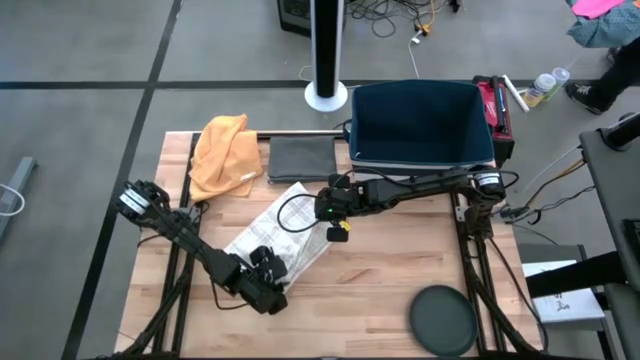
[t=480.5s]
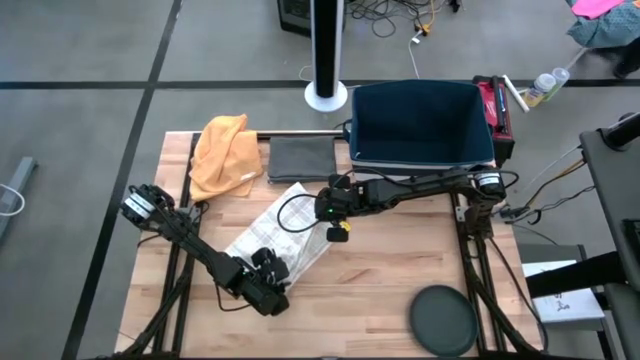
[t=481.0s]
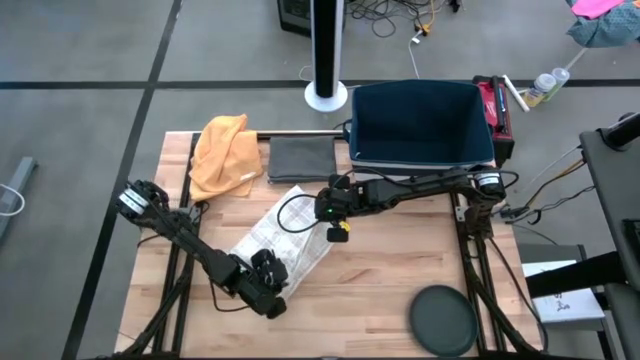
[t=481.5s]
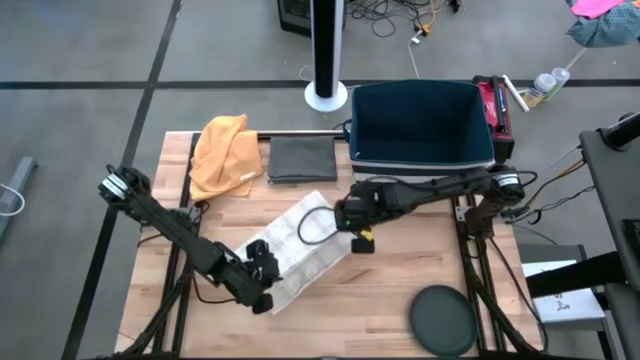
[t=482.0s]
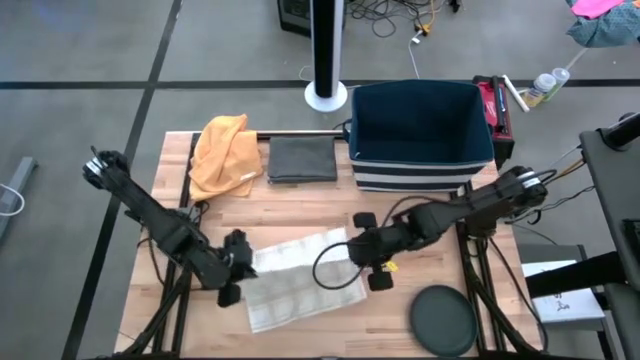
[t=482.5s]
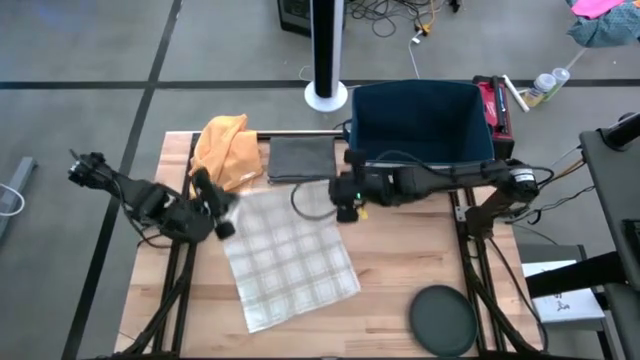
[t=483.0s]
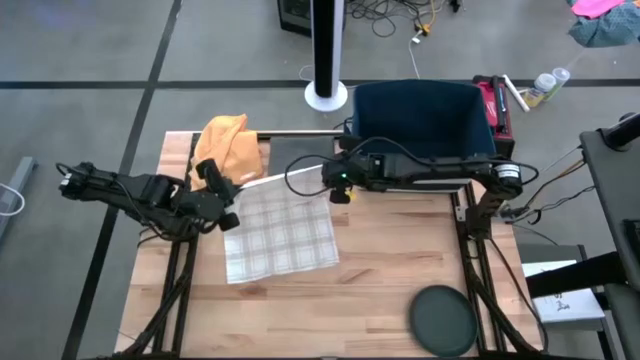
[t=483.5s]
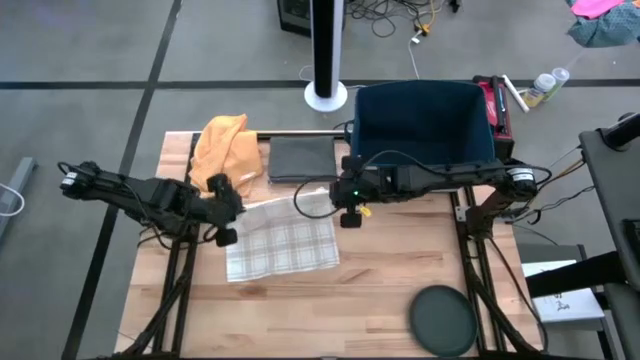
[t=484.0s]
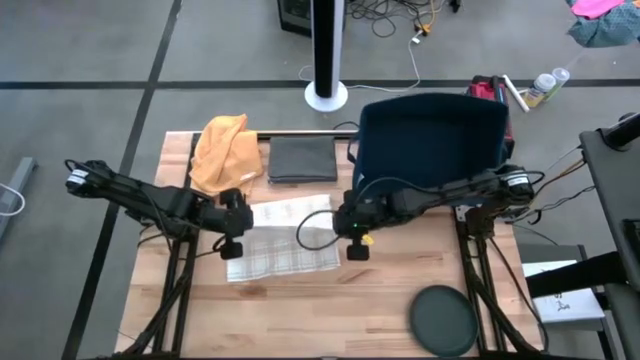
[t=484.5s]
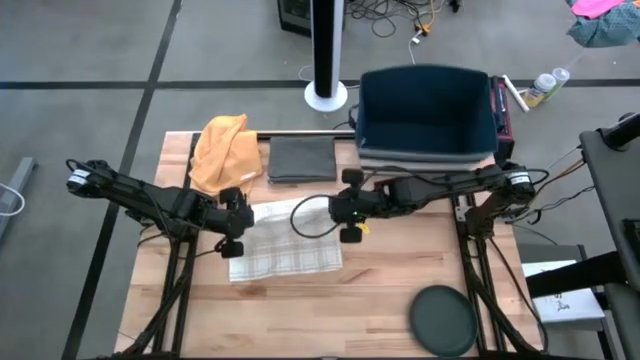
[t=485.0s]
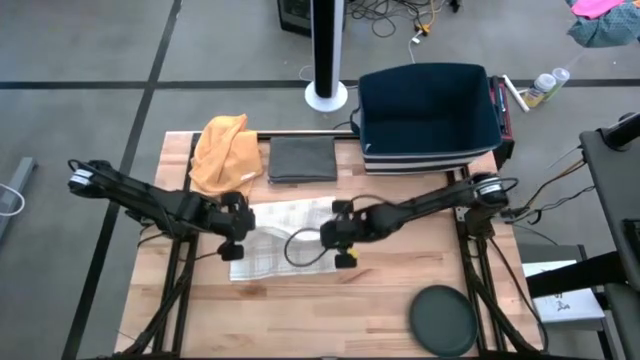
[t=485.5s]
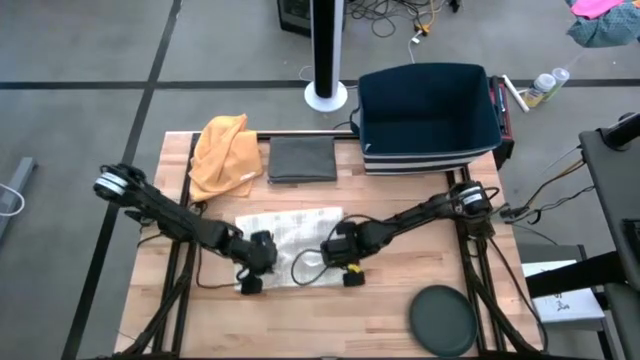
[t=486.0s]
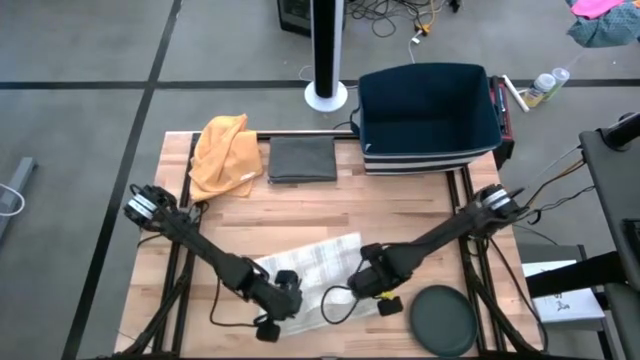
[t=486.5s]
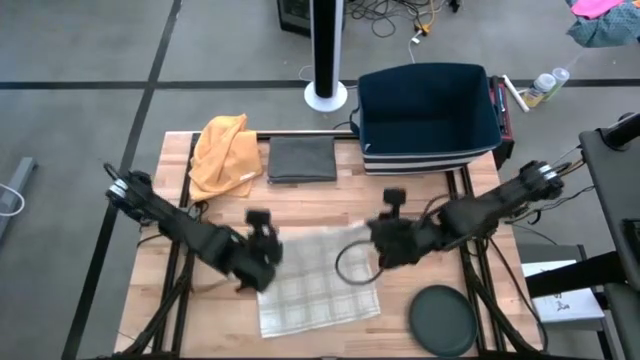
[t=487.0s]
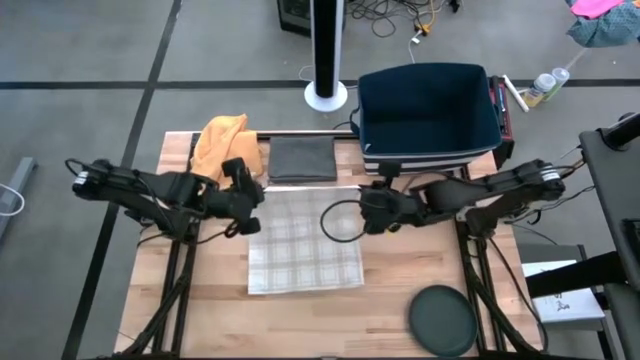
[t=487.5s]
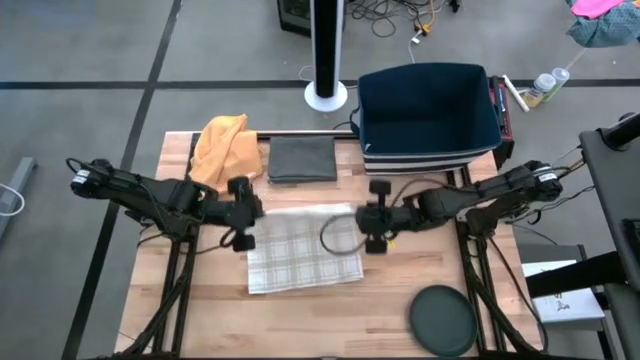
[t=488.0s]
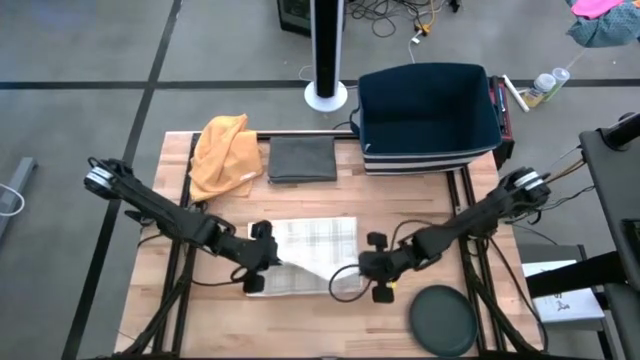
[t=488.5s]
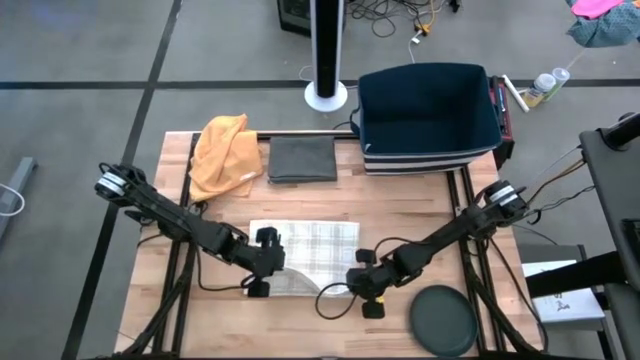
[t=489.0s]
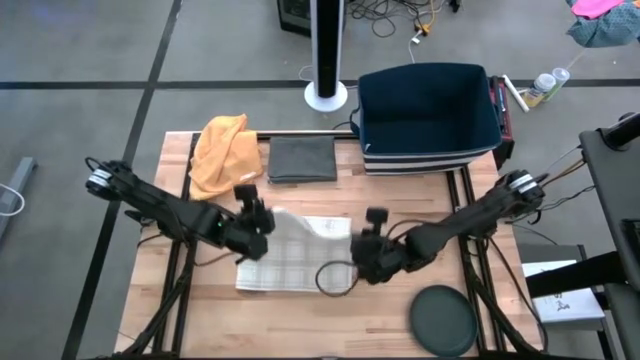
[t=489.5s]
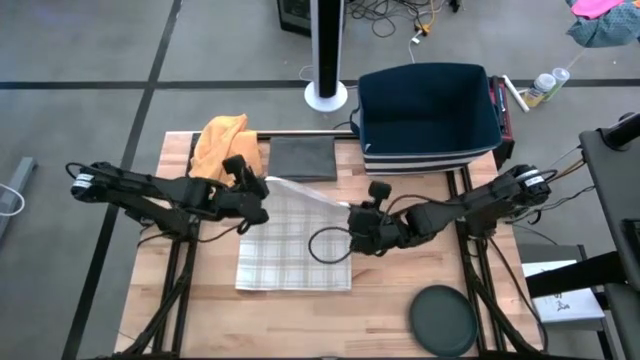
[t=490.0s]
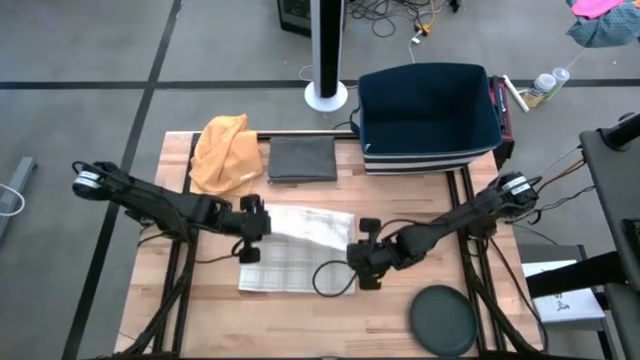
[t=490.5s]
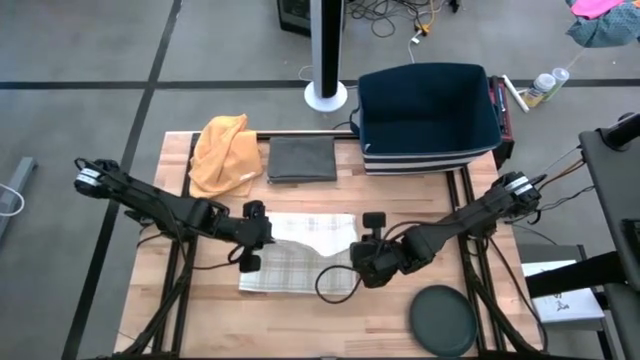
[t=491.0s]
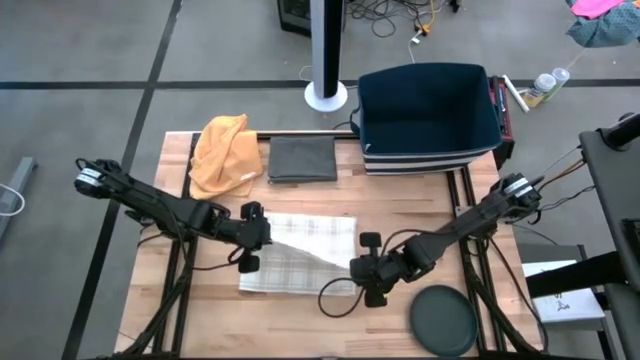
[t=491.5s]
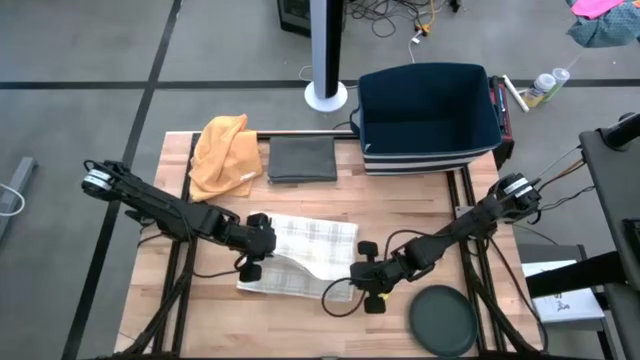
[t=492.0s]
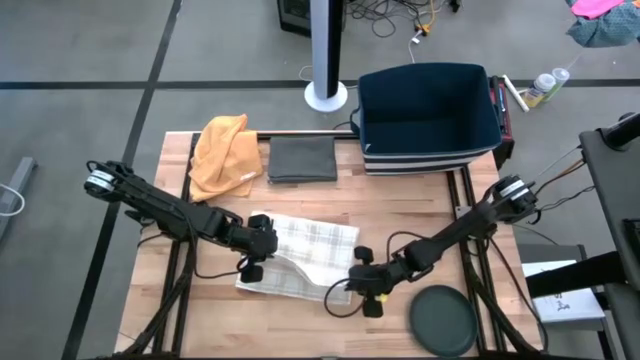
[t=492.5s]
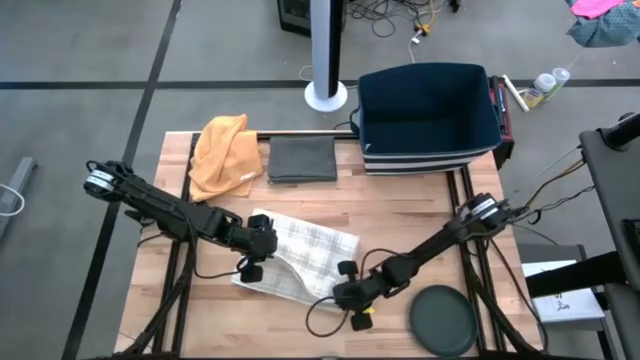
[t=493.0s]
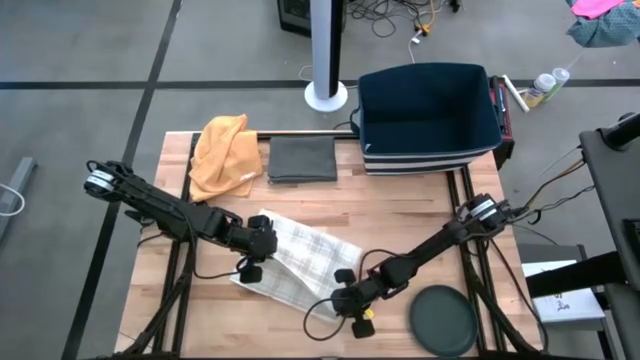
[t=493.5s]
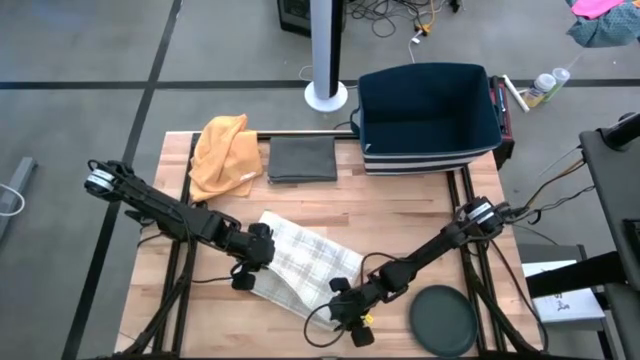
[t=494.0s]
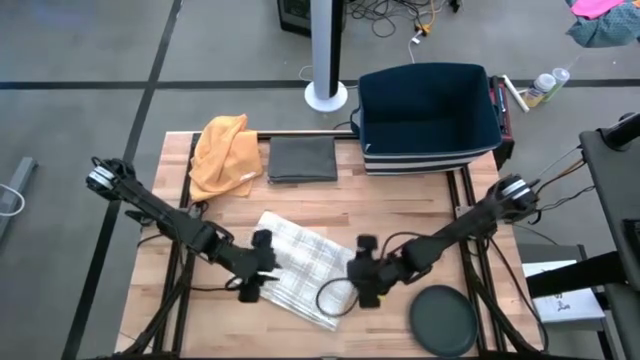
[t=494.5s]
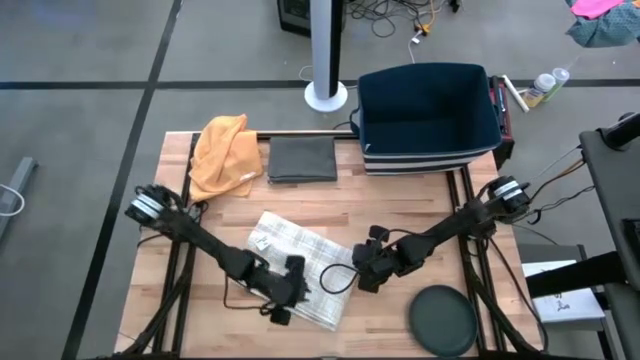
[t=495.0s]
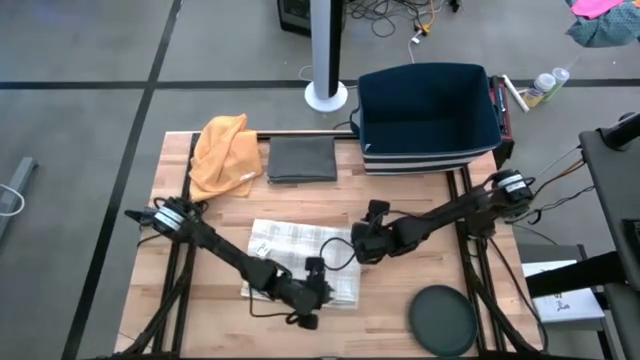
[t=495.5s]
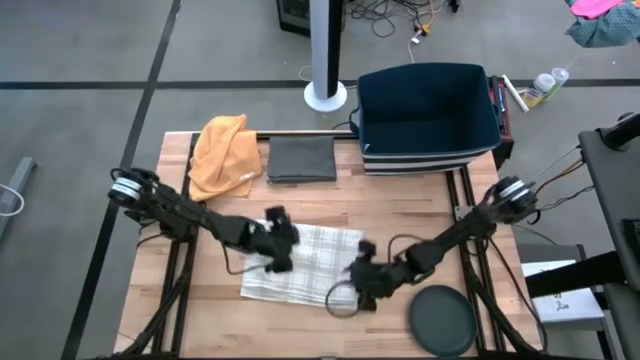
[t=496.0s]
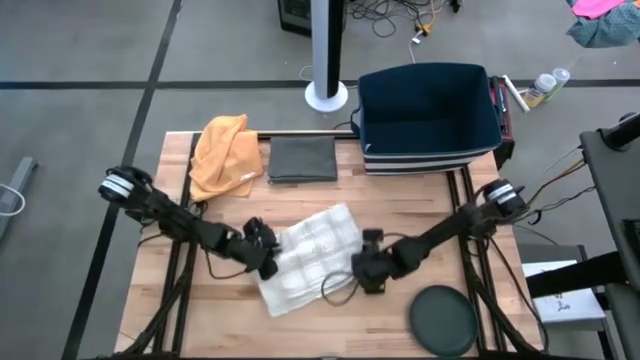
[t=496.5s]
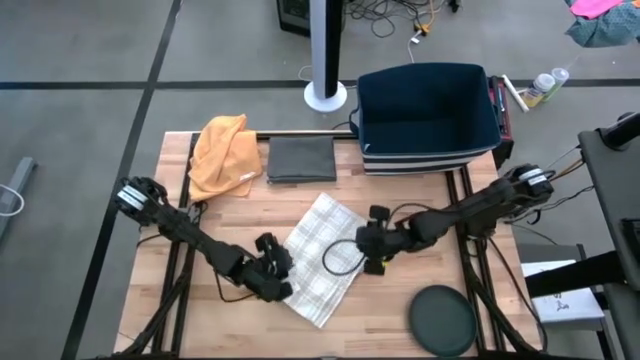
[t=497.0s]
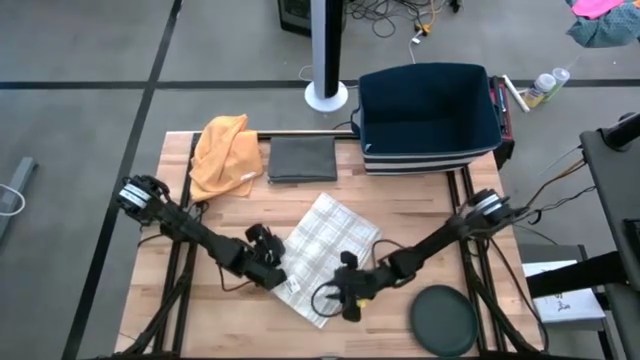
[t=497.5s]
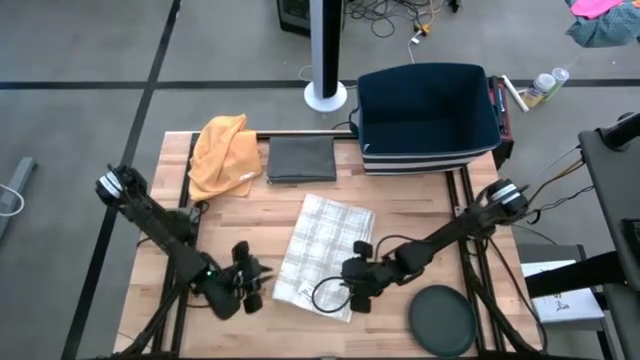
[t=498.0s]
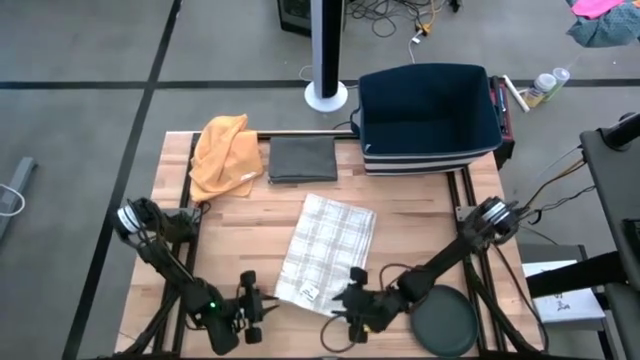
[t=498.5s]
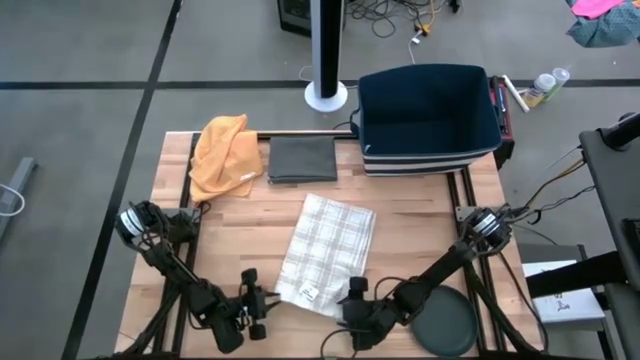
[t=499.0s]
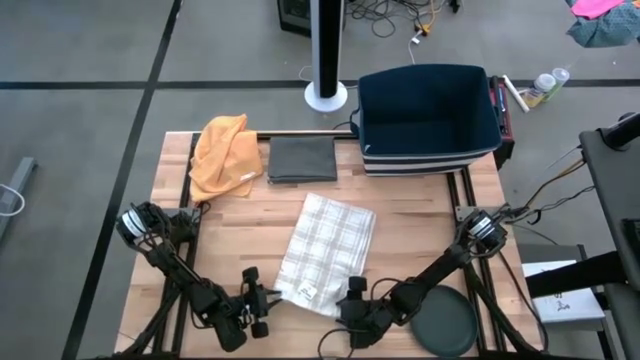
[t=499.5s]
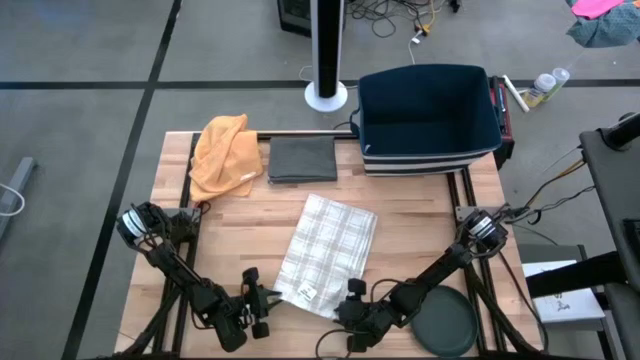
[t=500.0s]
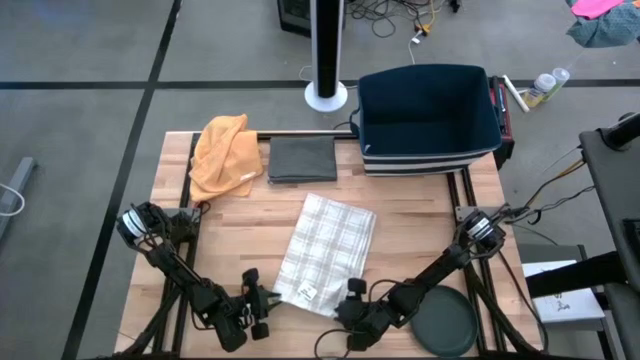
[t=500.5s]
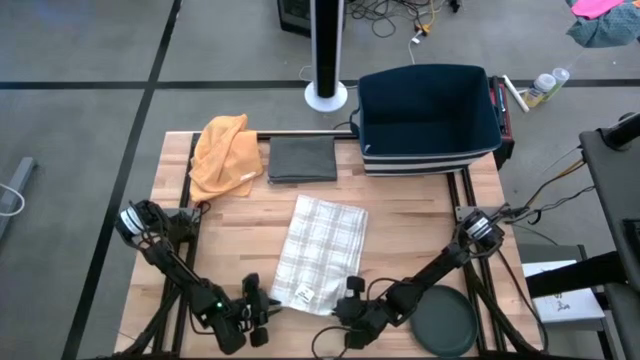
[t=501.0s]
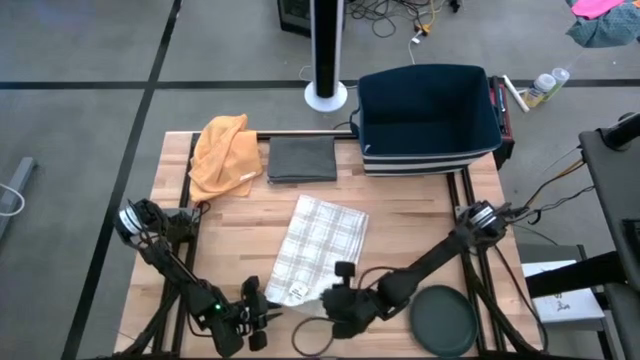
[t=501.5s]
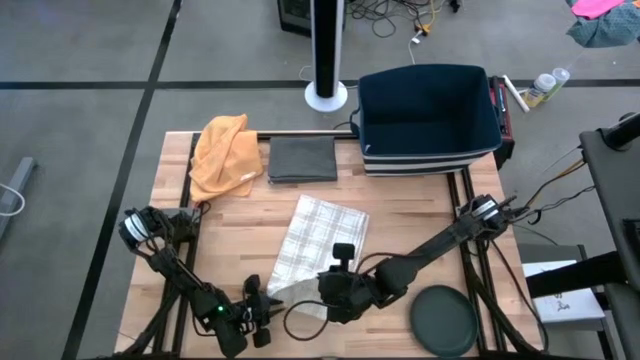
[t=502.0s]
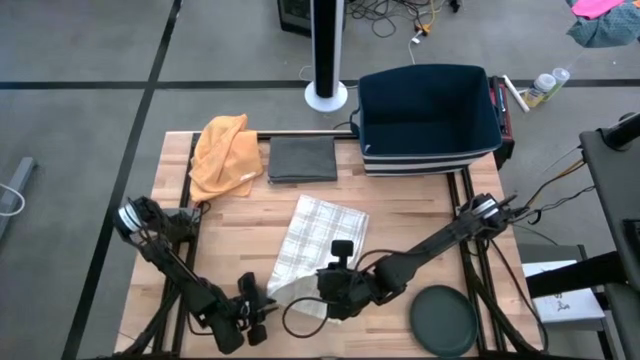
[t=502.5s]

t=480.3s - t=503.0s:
Task: Fold kitchen towel into neat rectangle
Fold the white patterned towel
